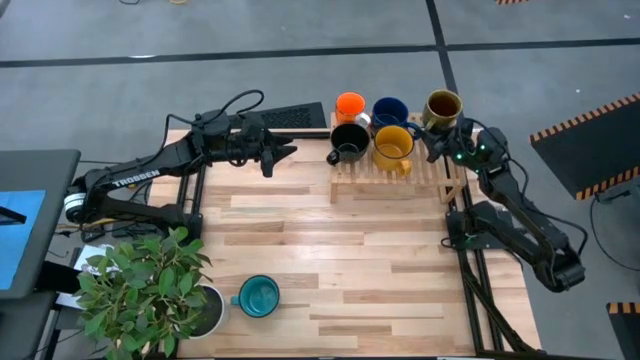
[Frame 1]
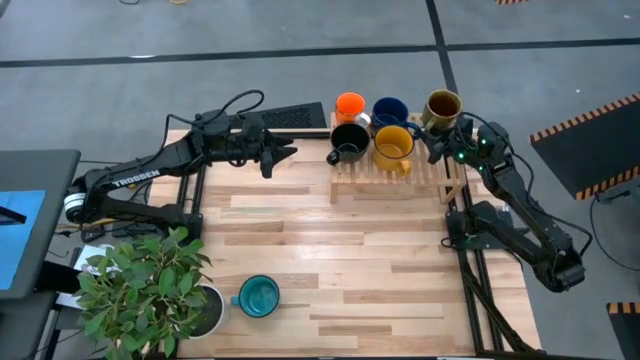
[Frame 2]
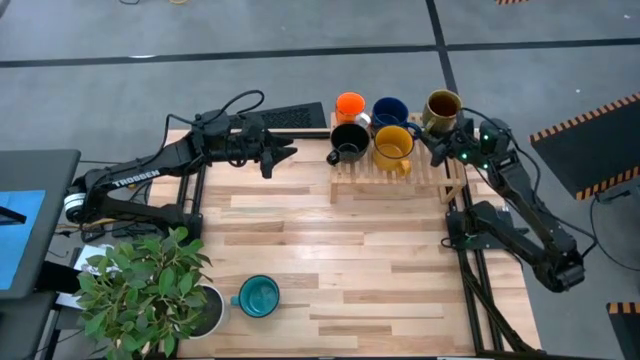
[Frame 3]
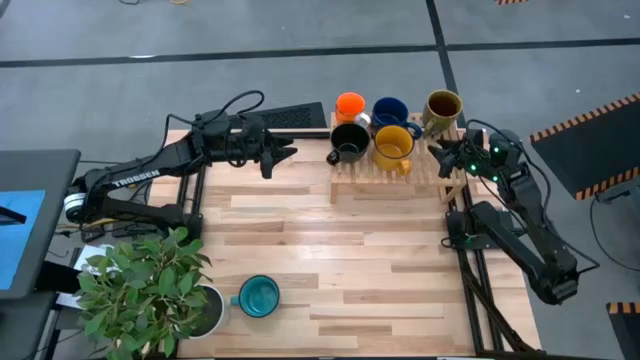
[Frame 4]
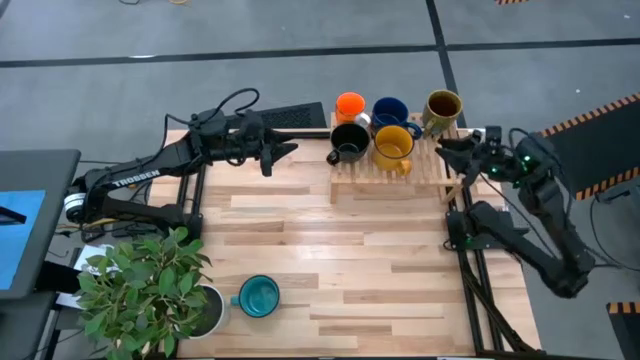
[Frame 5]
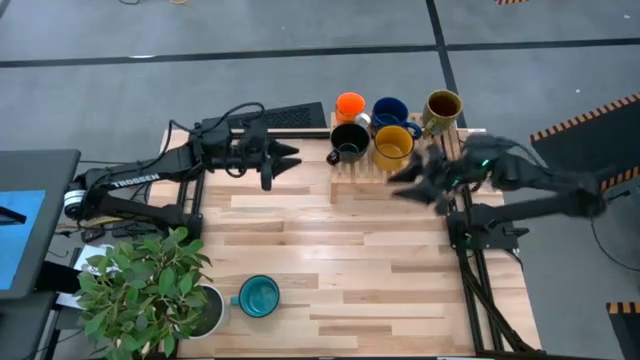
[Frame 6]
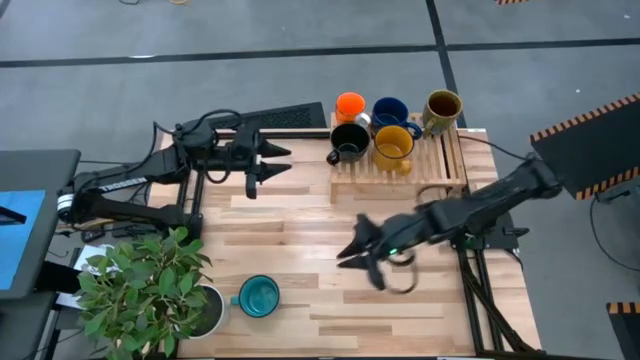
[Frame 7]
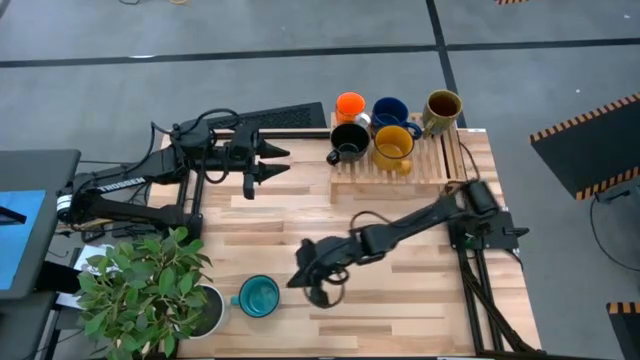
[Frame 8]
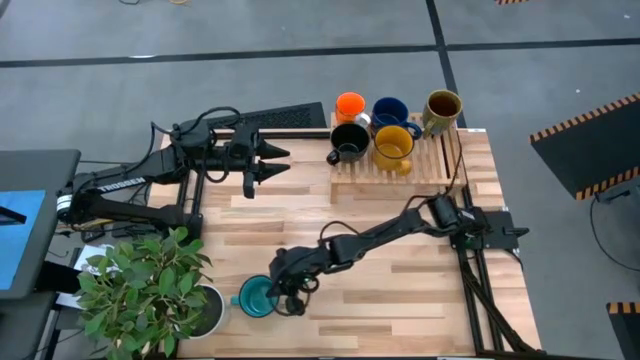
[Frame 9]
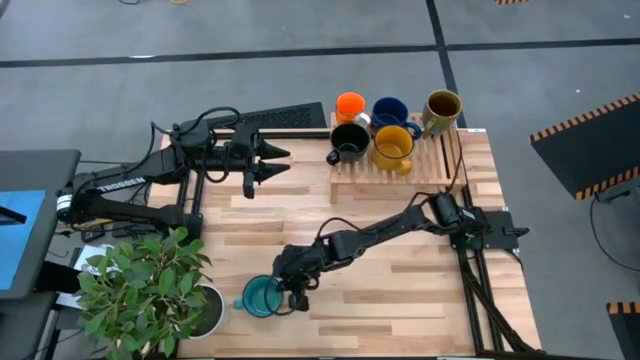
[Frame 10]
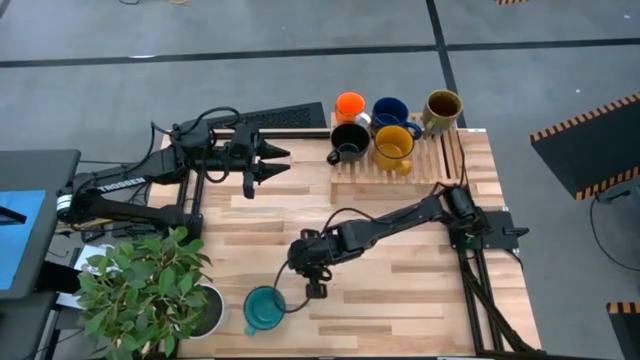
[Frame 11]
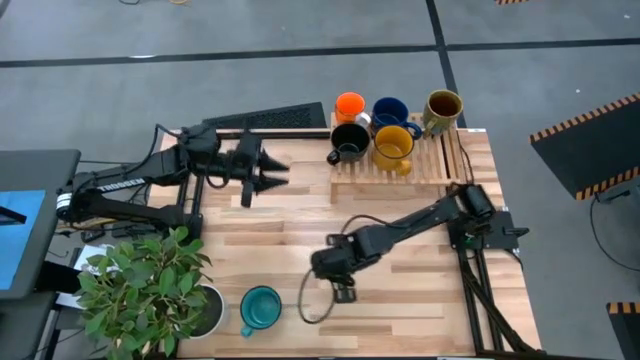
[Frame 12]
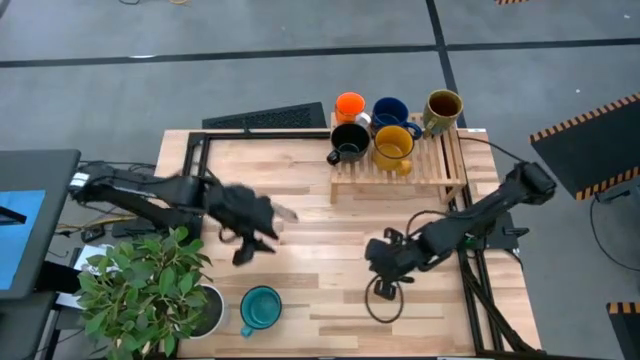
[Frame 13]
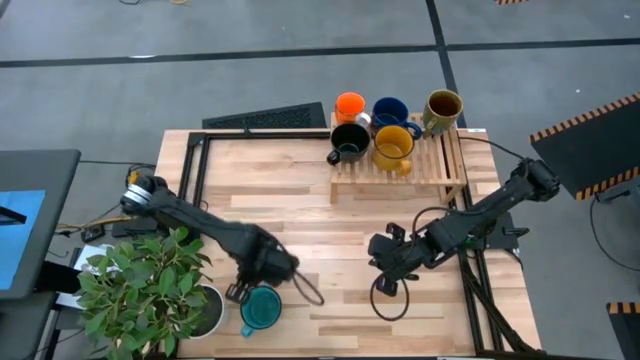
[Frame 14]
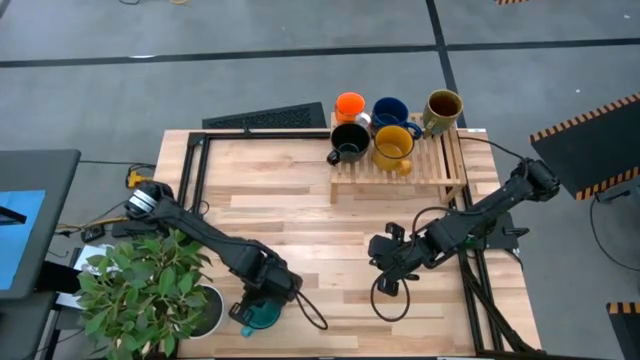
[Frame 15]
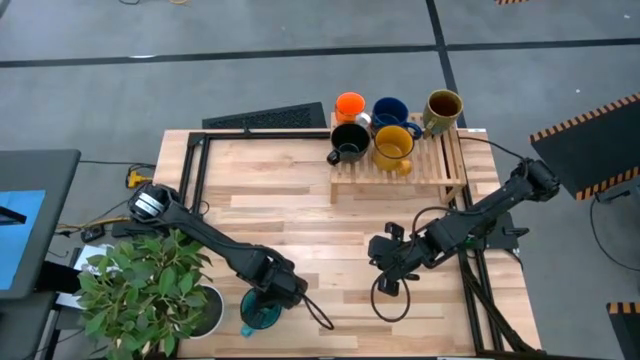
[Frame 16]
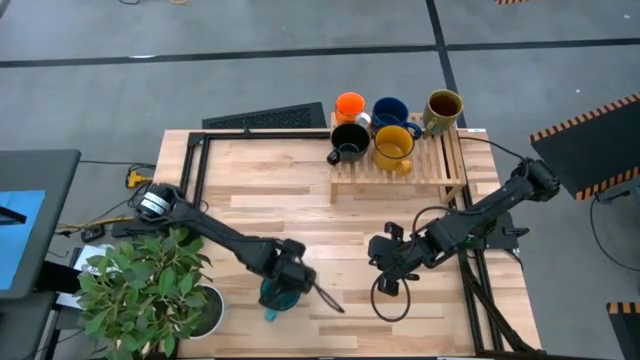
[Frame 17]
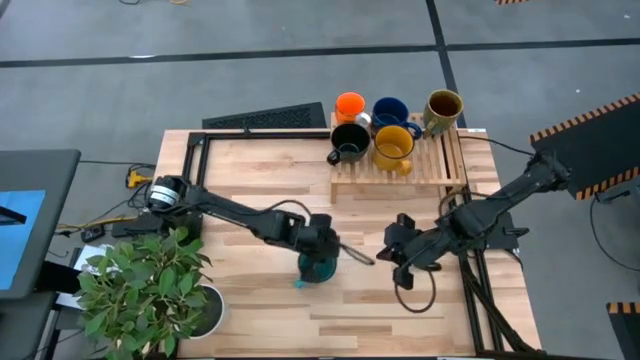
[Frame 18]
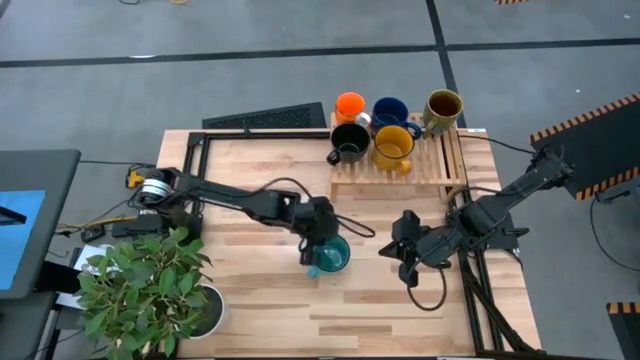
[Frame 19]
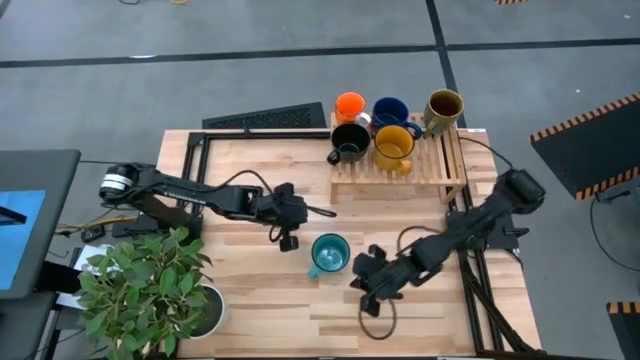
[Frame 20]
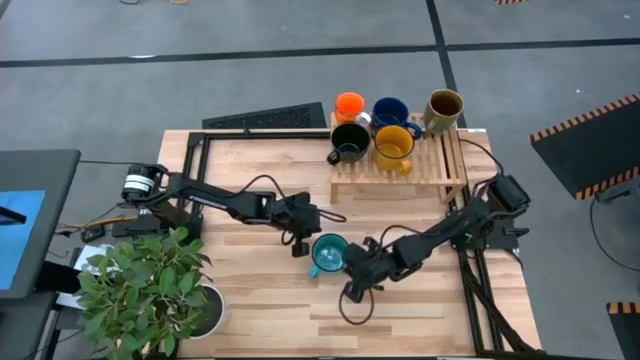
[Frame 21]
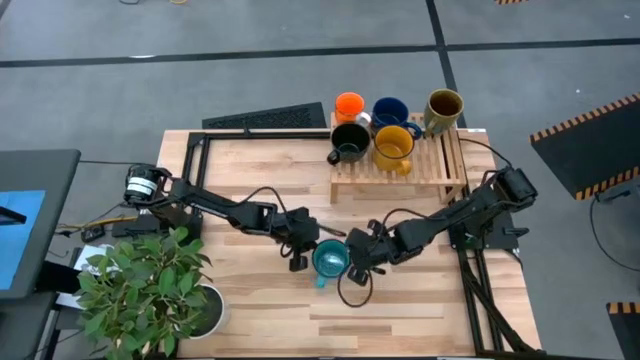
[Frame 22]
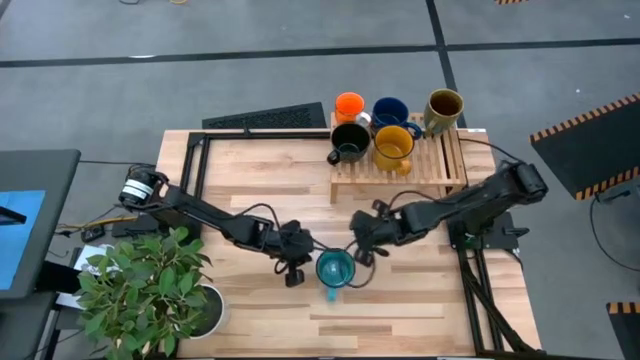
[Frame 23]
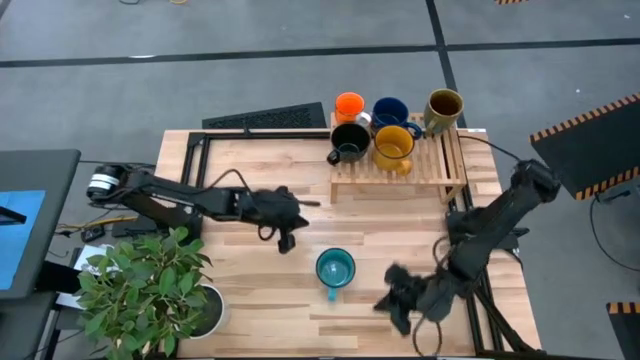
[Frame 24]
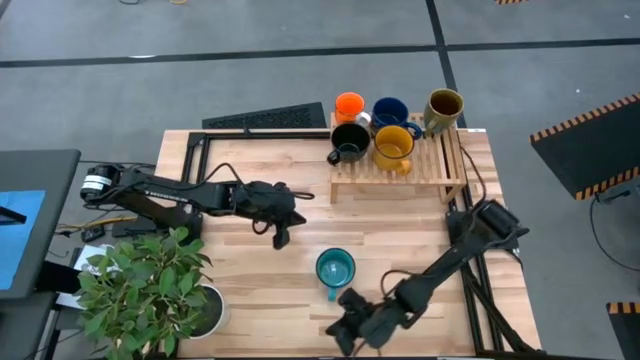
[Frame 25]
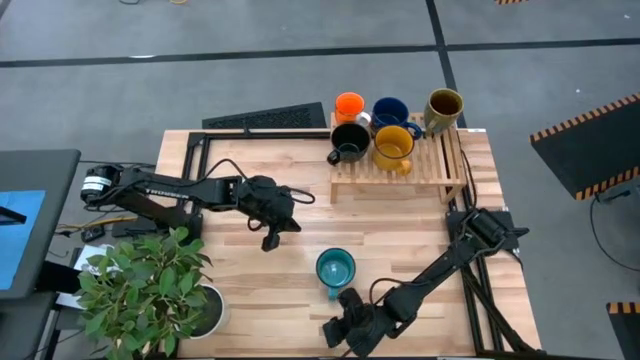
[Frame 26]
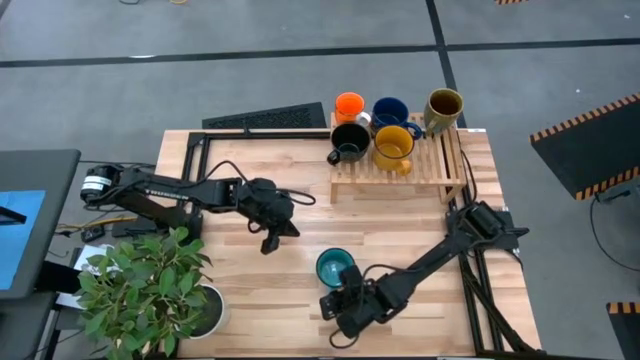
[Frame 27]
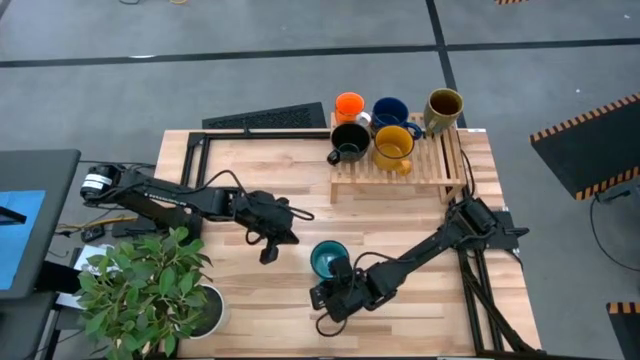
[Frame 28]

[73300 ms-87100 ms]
Task: Place coffee mugs
Put the blue mug on the shelf

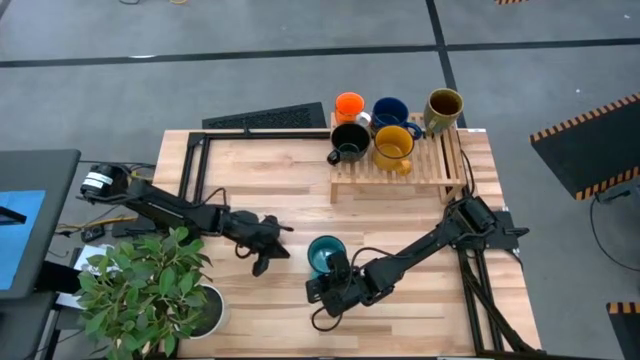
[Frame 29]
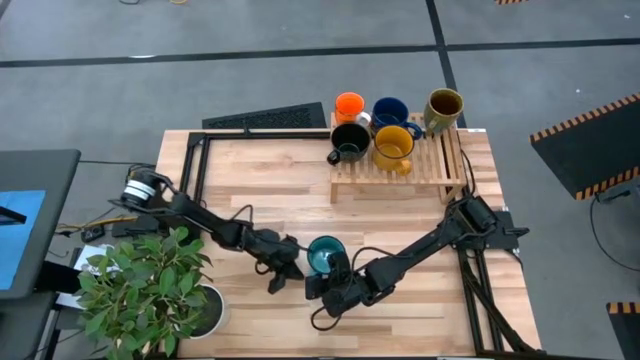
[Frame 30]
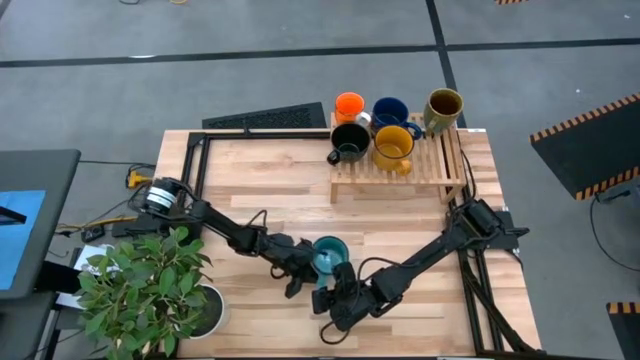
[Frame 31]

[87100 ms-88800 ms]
Put the blue mug on the shelf

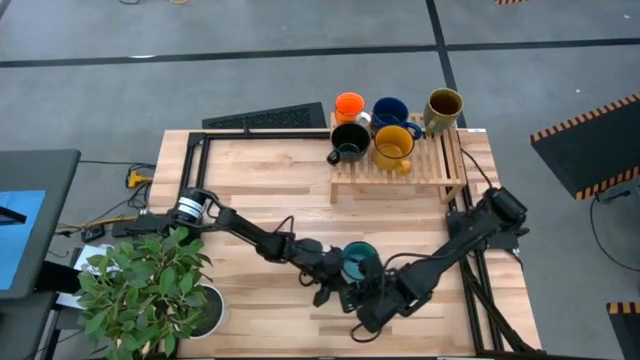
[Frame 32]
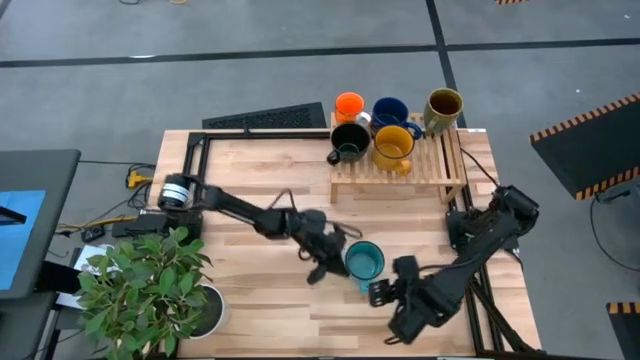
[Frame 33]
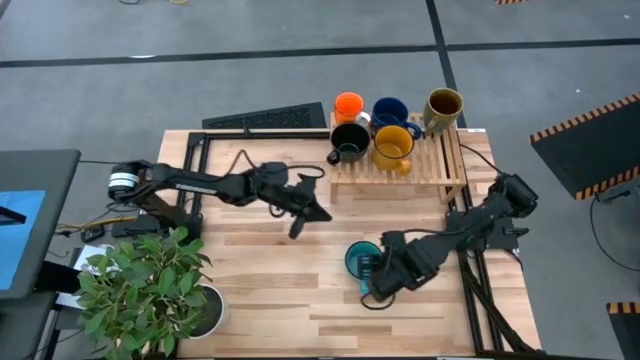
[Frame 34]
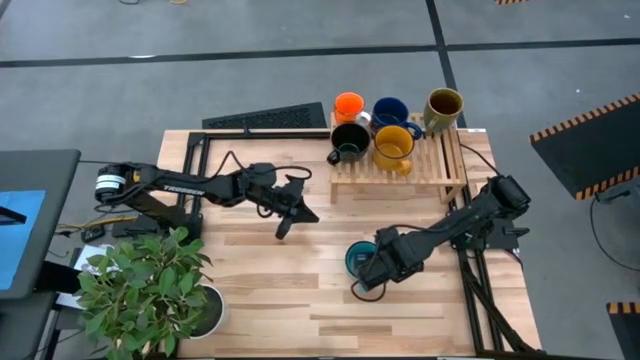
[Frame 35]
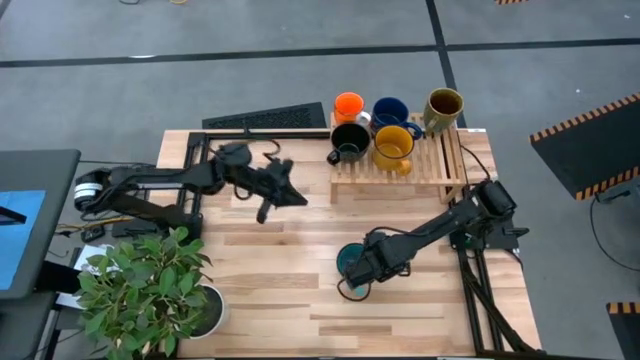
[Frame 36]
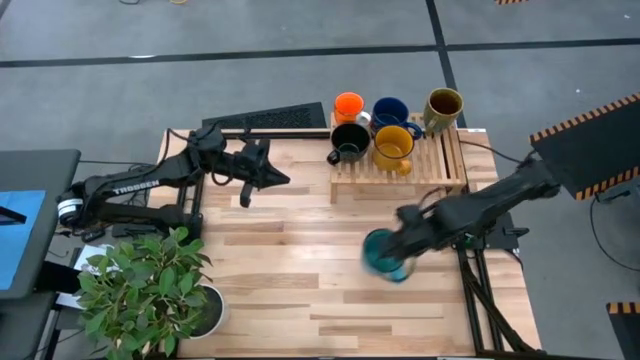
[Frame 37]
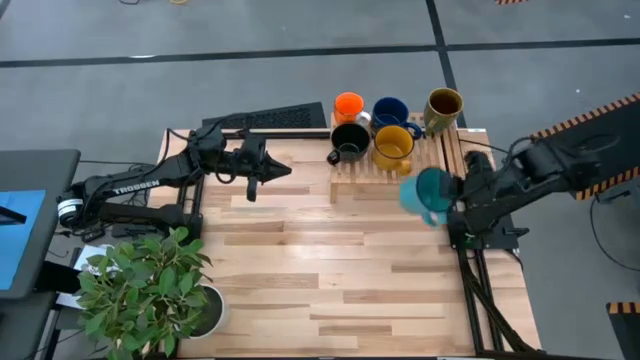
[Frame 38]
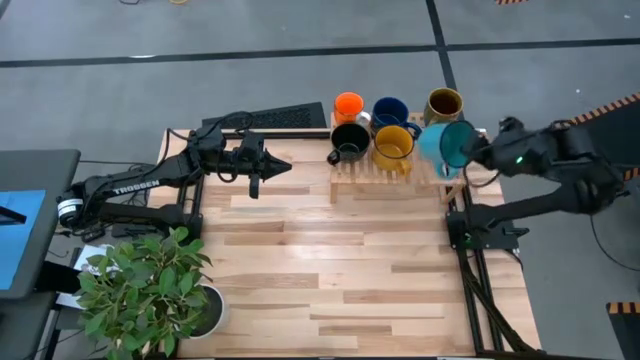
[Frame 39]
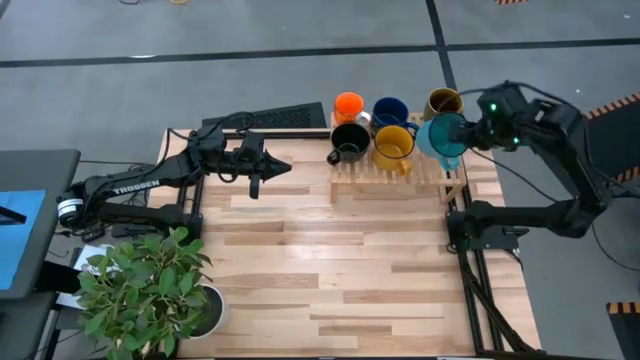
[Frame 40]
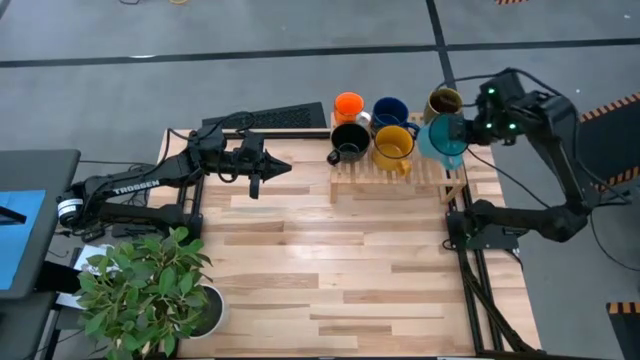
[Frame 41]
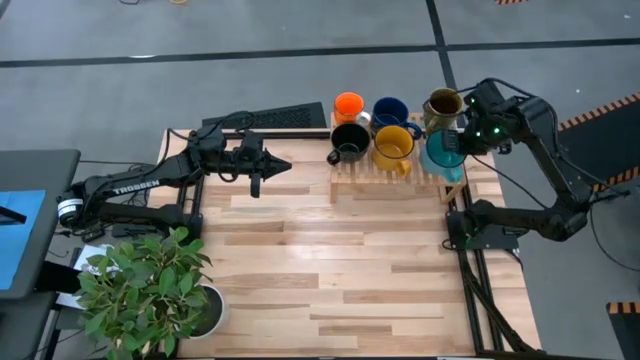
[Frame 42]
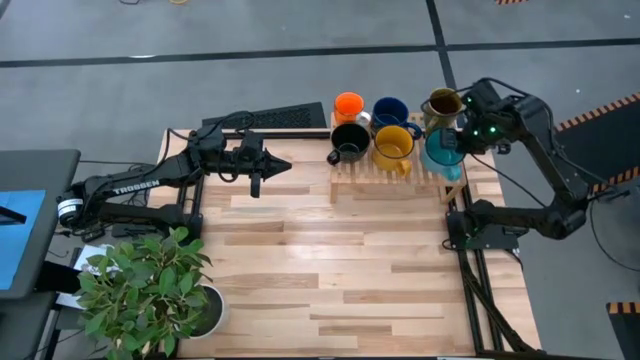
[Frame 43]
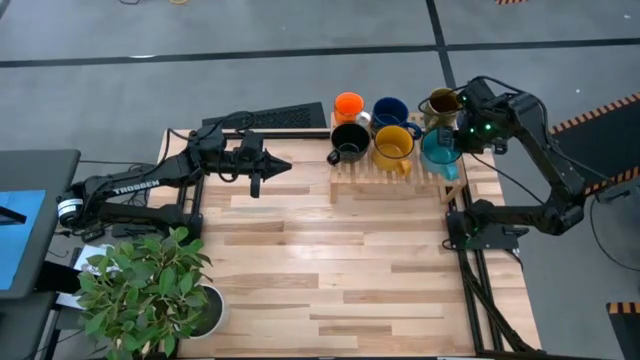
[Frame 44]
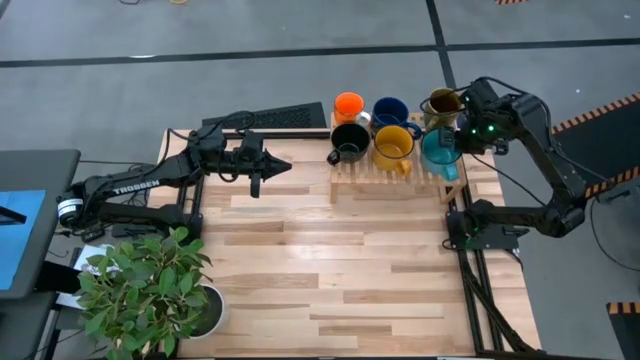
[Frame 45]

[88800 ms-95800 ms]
Put the blue mug on the shelf
